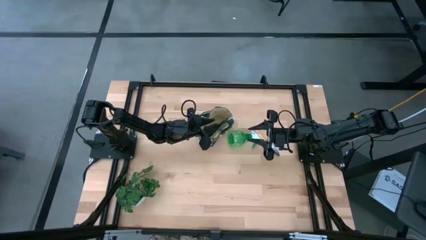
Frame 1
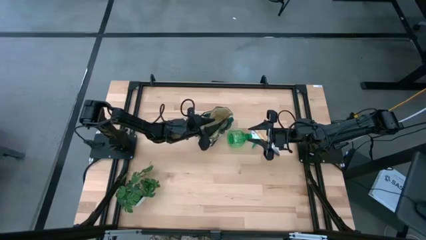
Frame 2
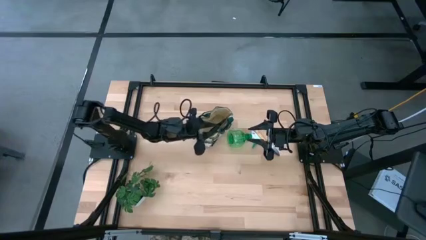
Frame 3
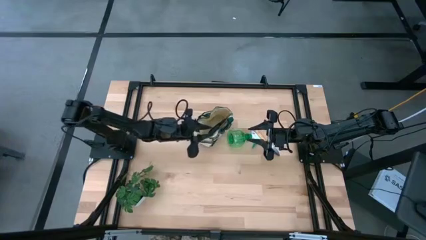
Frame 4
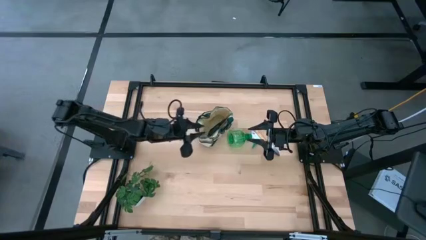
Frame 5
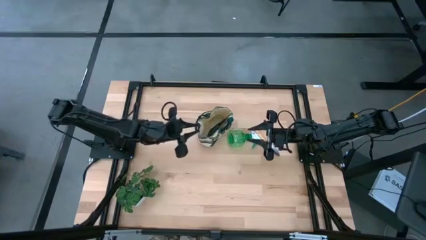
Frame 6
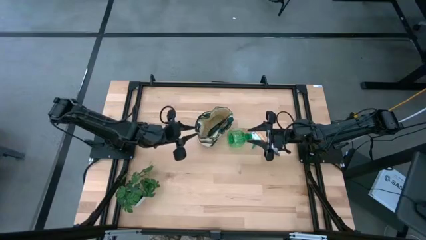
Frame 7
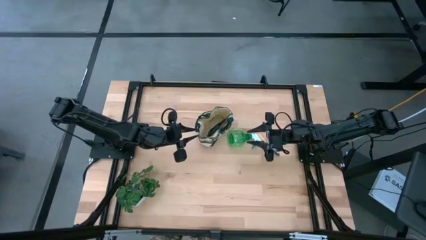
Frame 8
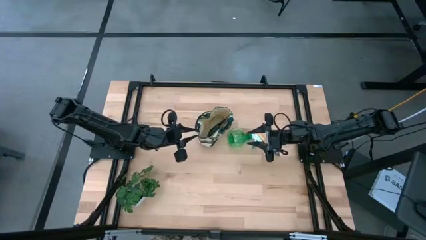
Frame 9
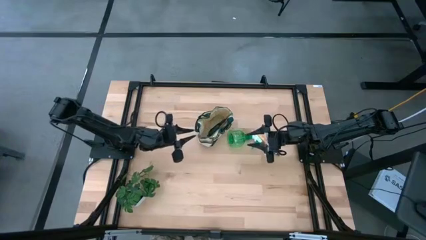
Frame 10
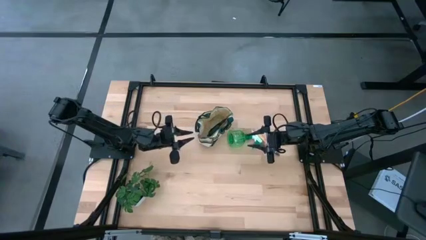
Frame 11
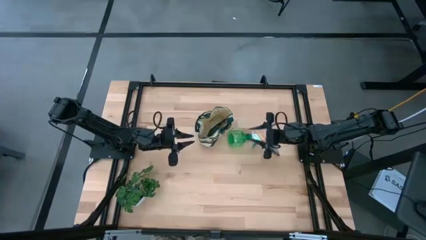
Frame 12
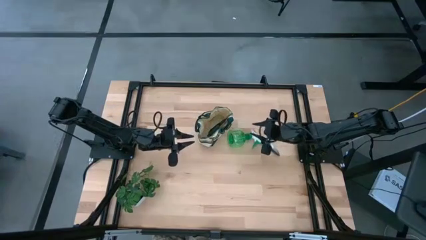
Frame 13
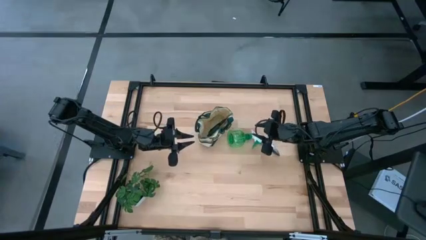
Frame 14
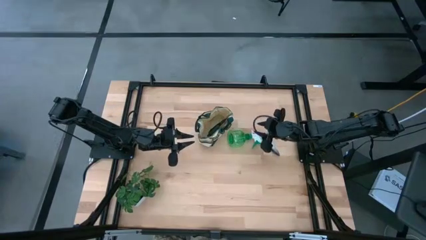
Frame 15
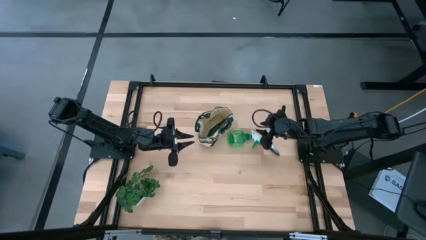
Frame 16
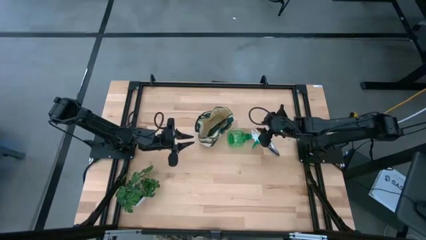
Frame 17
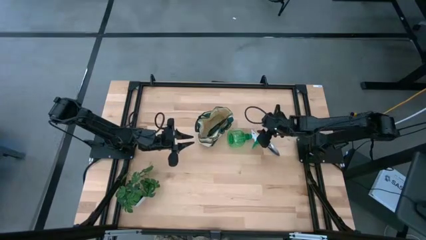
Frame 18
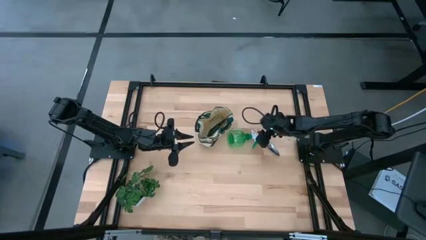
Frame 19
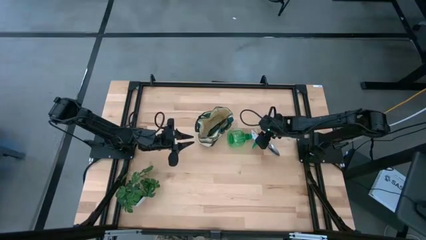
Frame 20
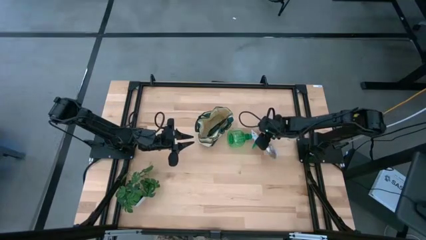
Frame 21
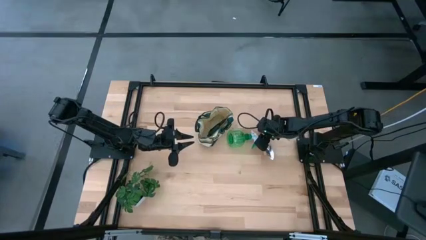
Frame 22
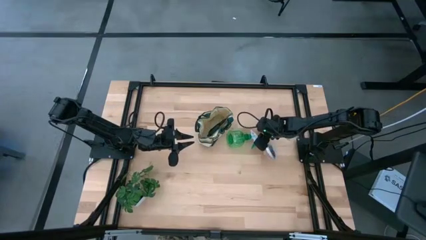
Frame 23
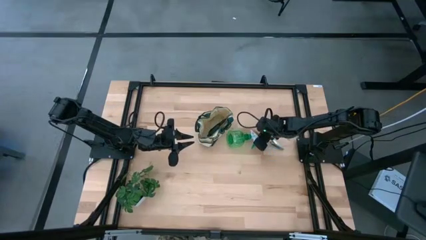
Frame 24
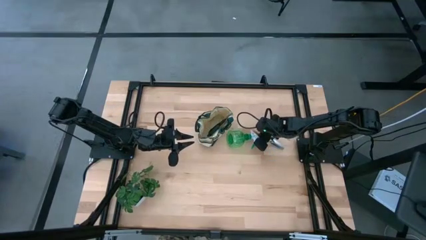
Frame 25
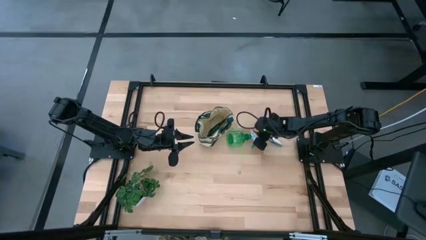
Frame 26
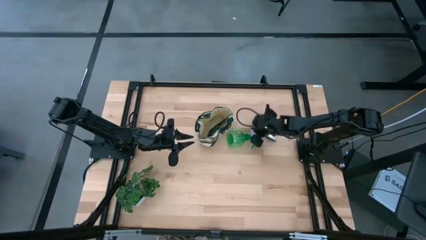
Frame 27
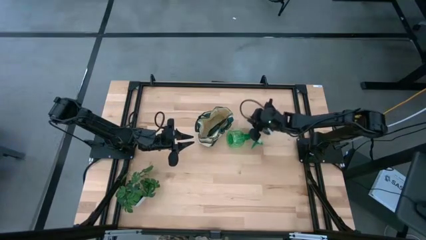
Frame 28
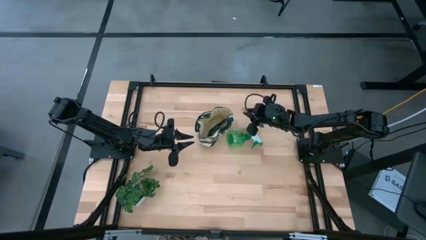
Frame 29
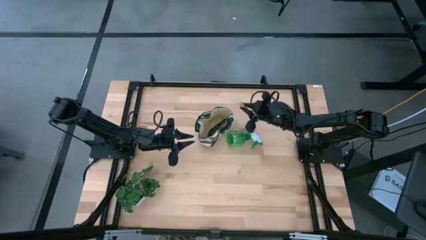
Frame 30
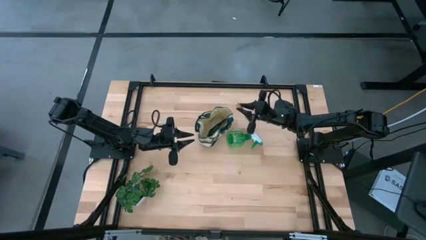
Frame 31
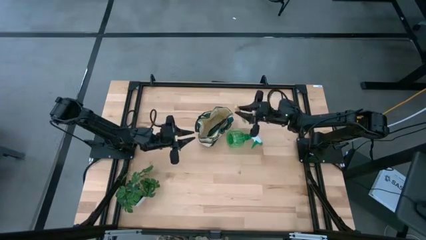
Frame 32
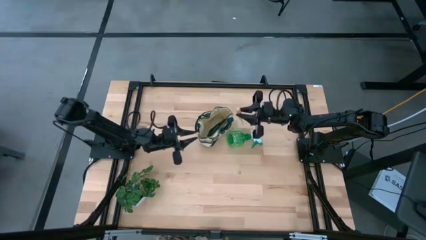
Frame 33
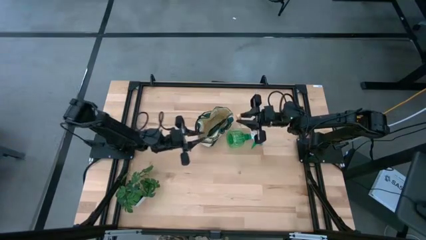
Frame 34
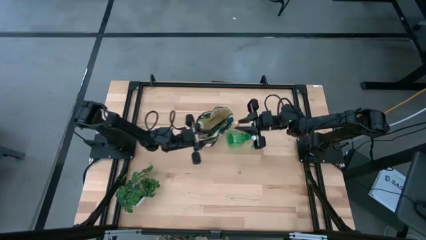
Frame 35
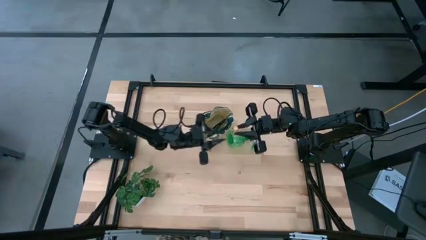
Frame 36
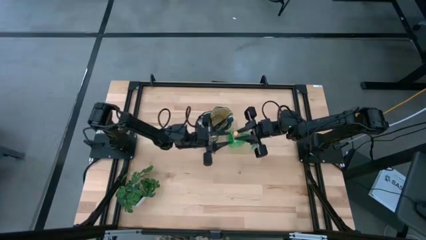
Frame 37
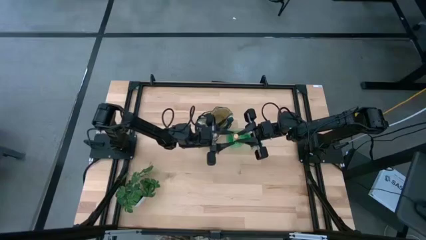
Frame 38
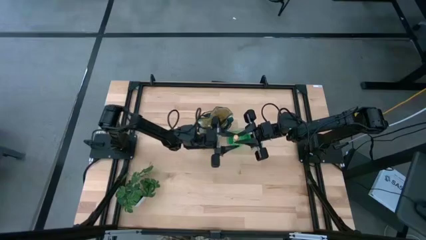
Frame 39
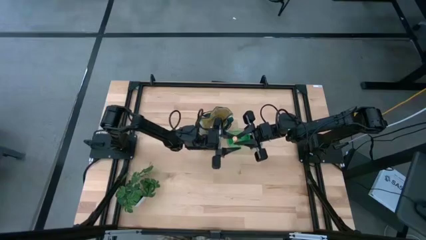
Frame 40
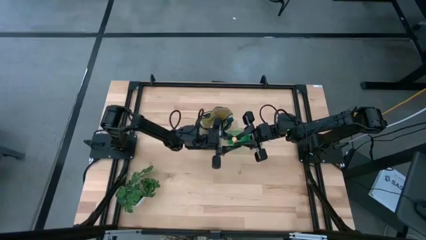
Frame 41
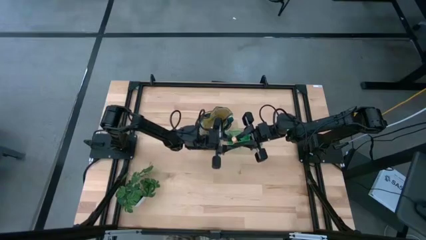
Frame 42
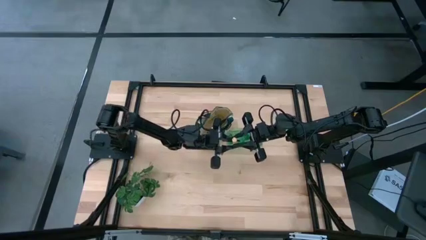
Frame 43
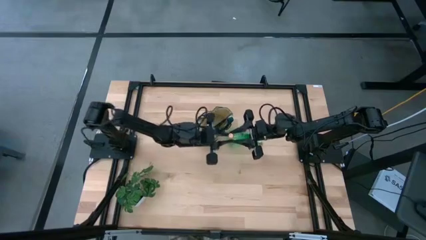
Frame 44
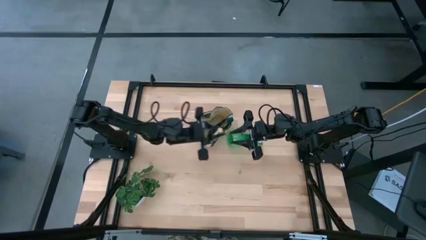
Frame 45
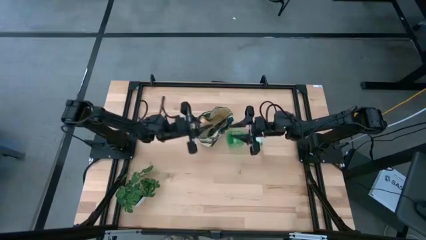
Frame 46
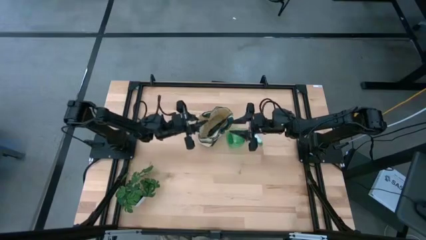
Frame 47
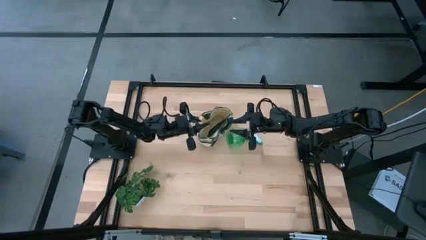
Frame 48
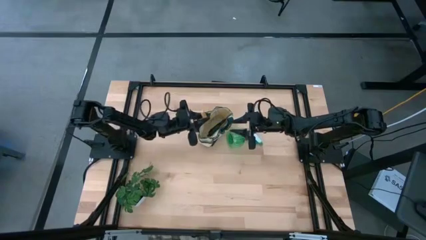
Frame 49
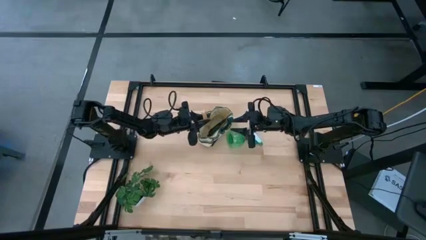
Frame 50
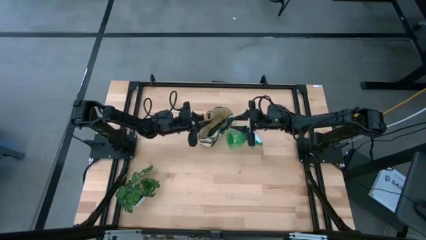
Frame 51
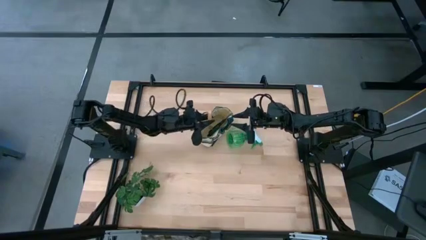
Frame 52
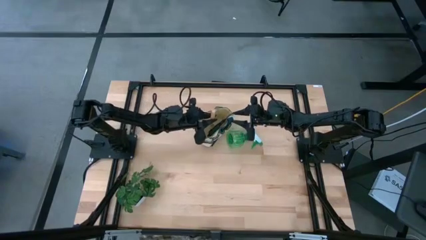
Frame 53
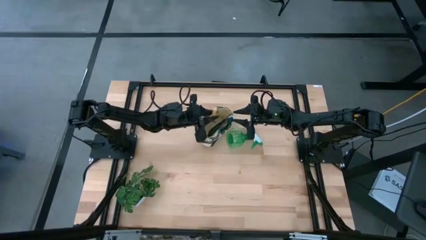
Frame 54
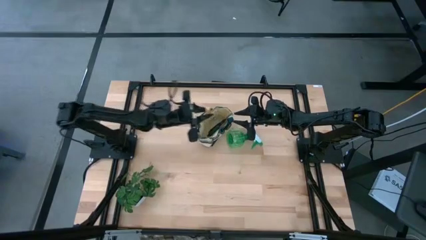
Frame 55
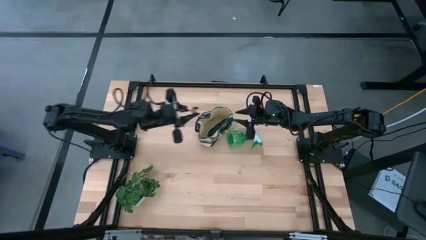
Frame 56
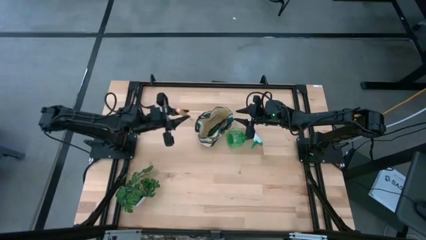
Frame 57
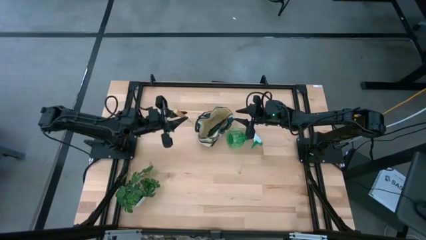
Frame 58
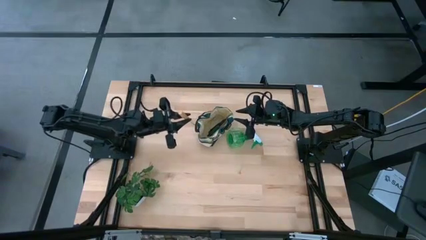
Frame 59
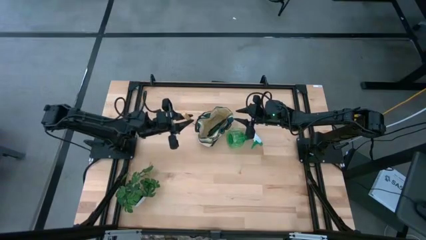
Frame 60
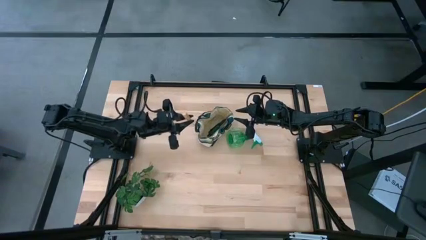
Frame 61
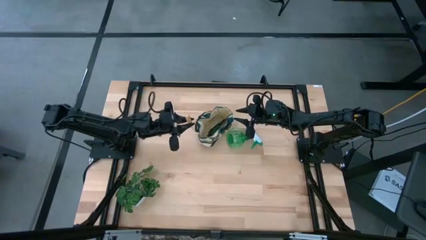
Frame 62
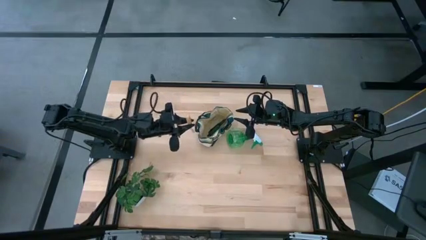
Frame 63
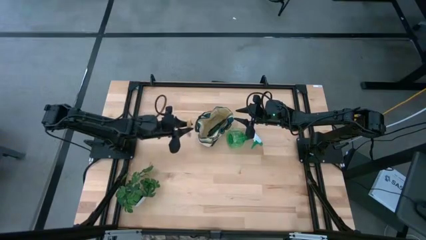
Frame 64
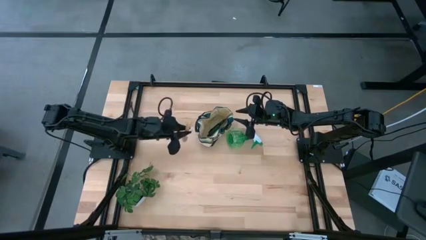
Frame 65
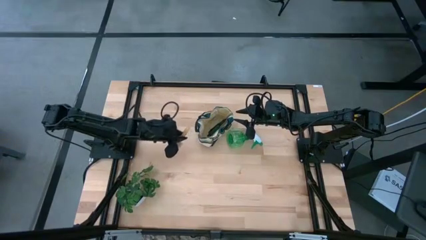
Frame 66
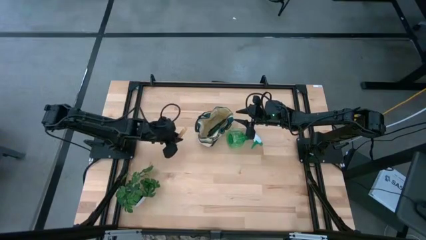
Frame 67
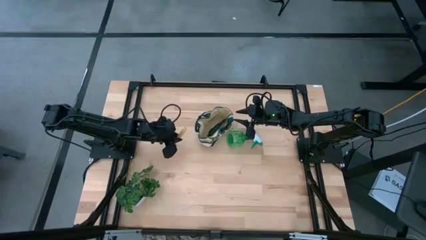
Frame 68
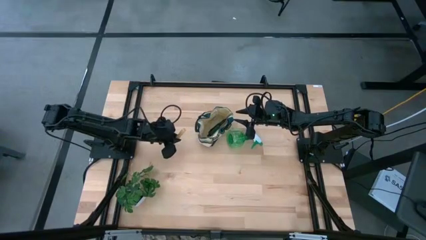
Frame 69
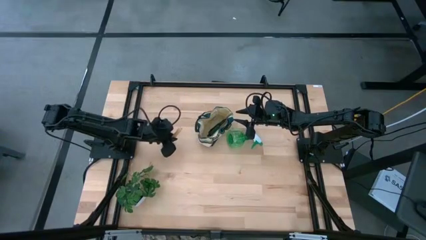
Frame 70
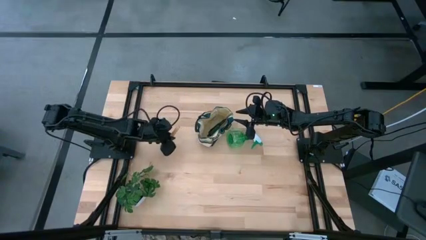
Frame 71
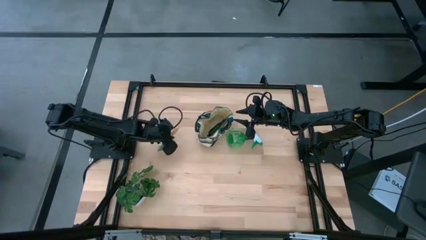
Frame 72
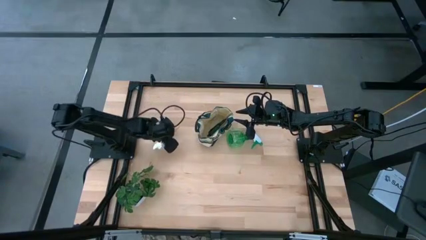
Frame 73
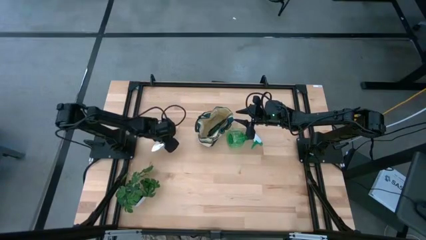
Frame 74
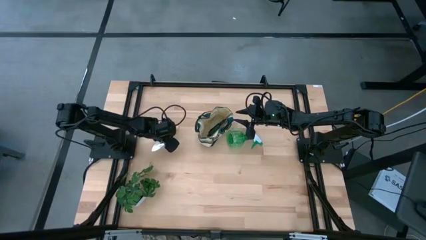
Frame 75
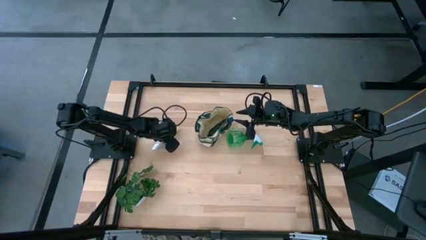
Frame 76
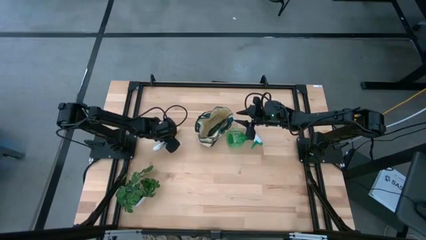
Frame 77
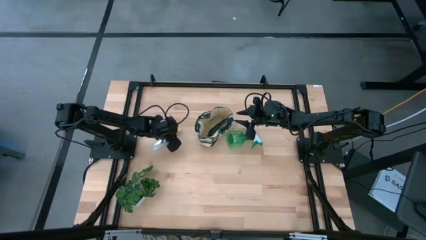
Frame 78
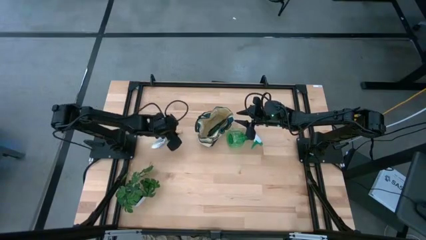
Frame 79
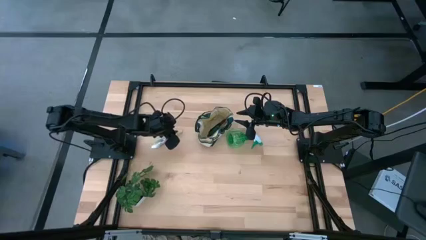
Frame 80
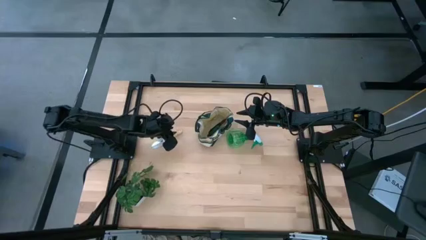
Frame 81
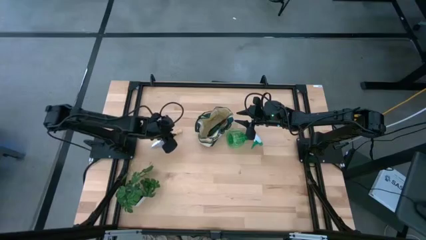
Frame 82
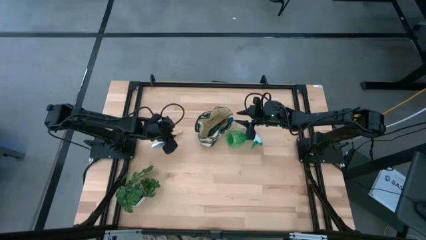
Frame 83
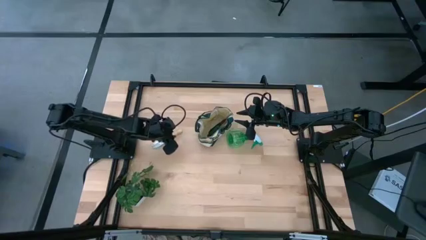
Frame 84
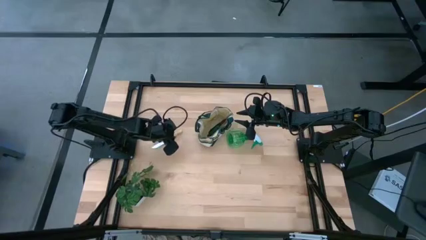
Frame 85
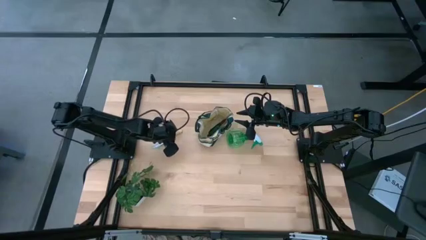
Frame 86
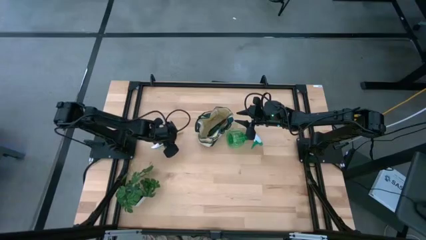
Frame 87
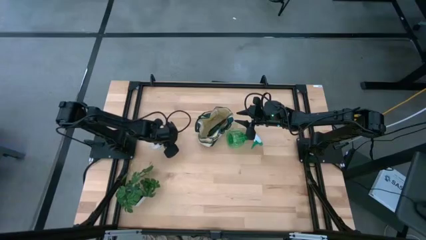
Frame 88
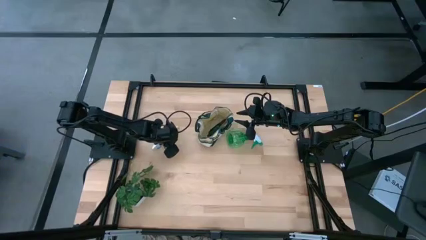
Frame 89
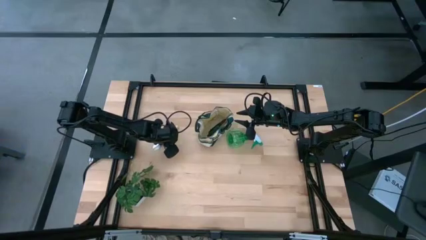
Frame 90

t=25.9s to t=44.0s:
Task: Pick & Place Garden tools in Gardening bag
Put the brown trowel into the light brown gardening bag
